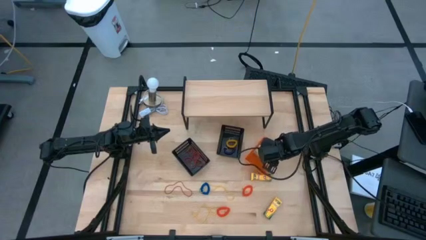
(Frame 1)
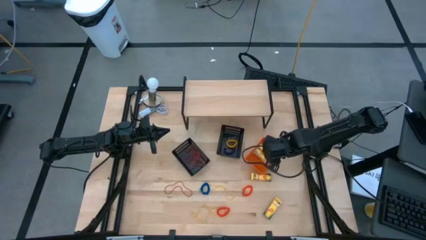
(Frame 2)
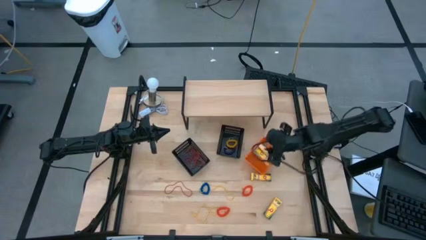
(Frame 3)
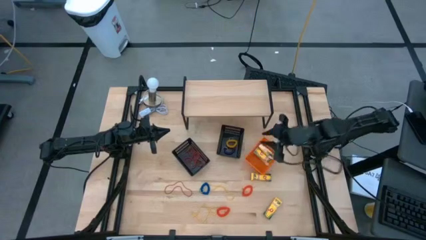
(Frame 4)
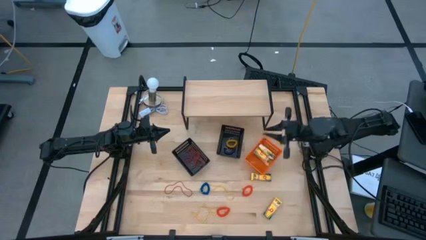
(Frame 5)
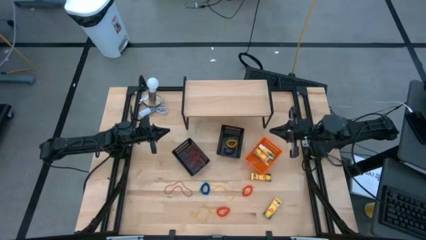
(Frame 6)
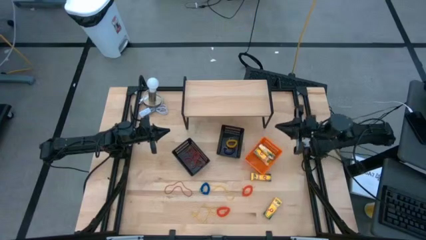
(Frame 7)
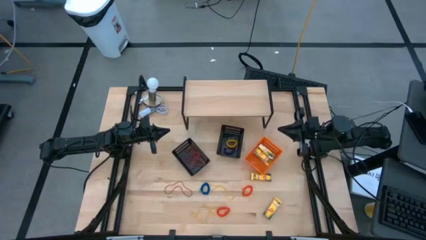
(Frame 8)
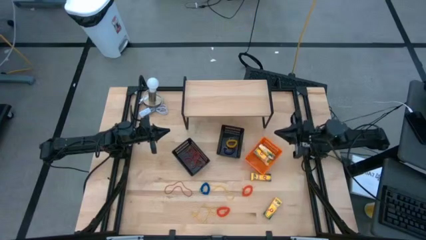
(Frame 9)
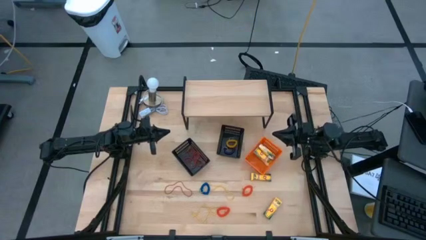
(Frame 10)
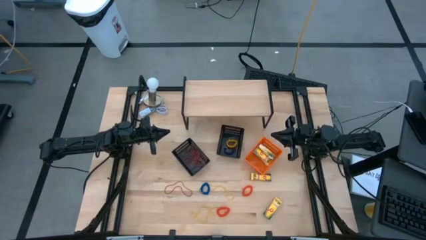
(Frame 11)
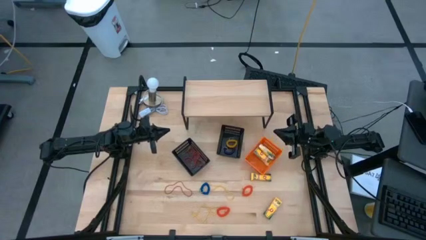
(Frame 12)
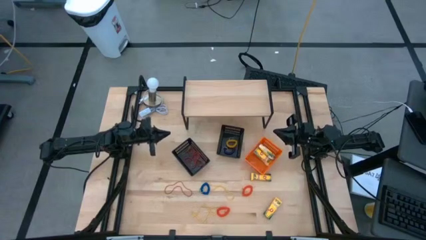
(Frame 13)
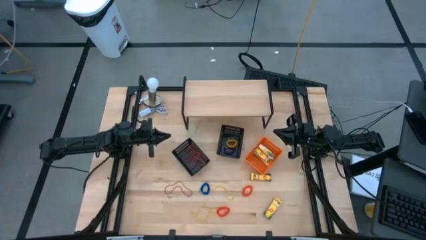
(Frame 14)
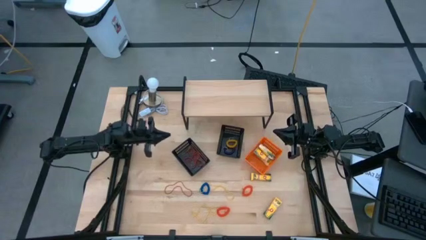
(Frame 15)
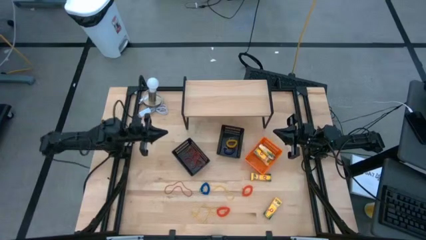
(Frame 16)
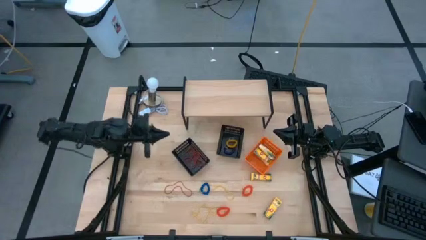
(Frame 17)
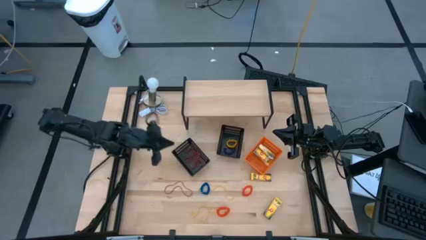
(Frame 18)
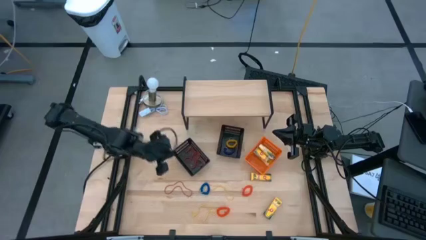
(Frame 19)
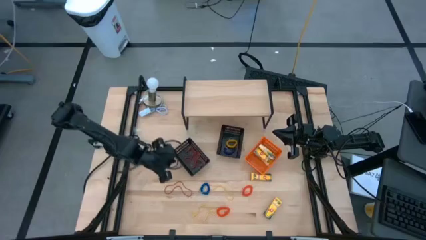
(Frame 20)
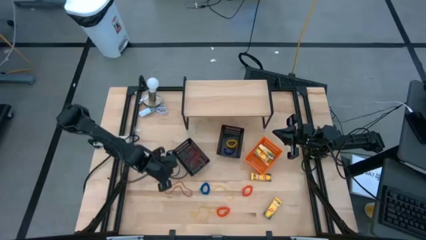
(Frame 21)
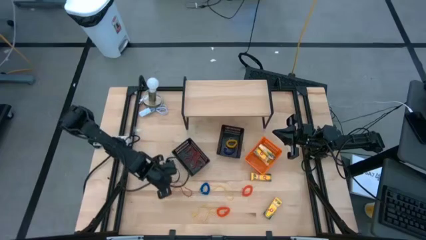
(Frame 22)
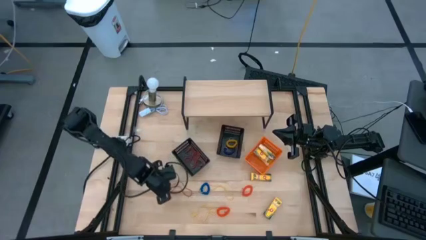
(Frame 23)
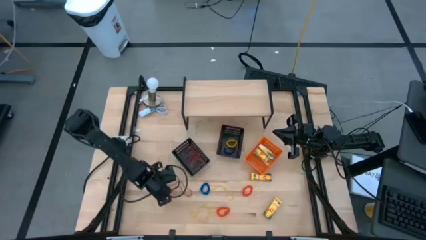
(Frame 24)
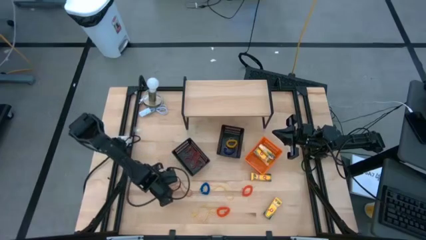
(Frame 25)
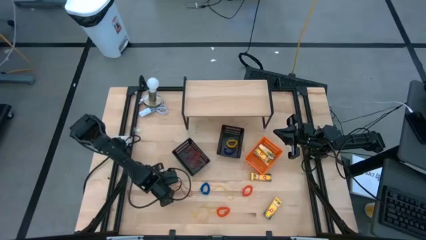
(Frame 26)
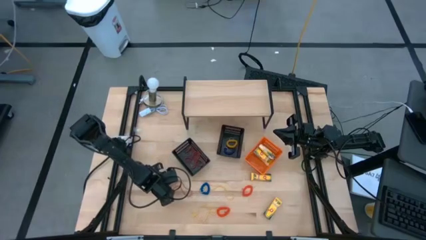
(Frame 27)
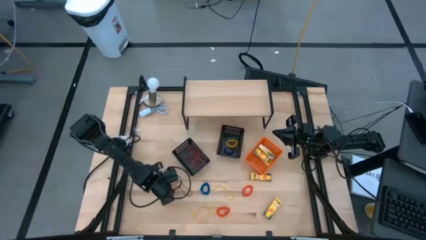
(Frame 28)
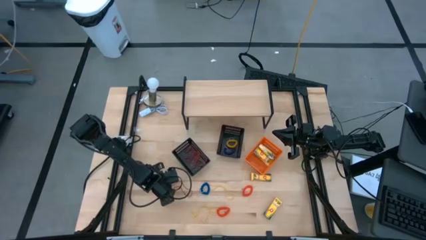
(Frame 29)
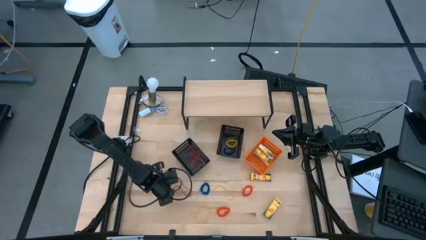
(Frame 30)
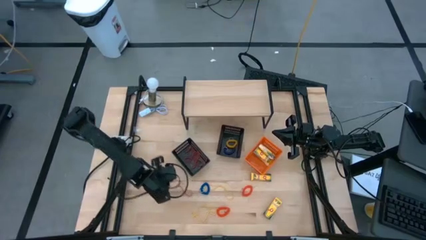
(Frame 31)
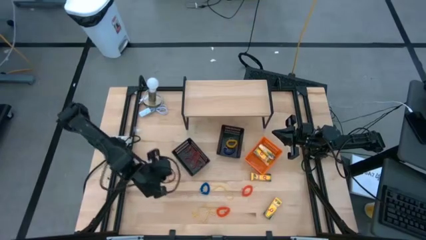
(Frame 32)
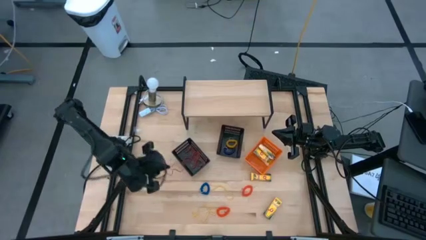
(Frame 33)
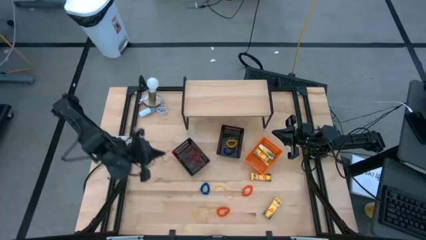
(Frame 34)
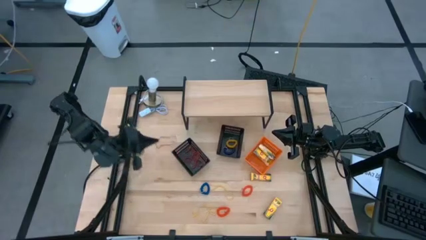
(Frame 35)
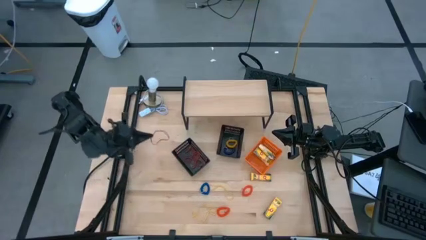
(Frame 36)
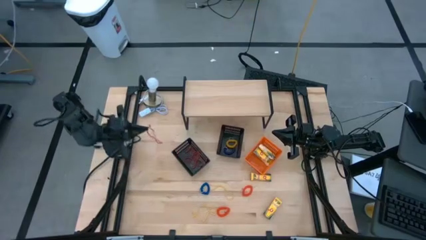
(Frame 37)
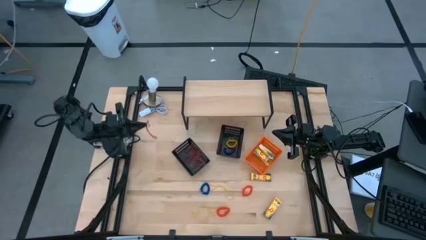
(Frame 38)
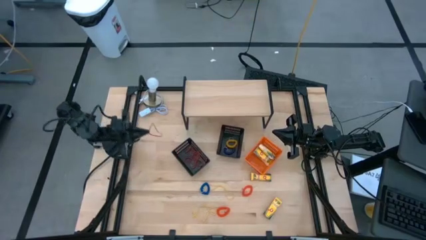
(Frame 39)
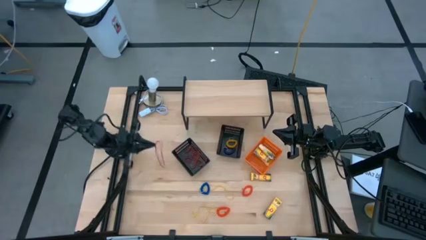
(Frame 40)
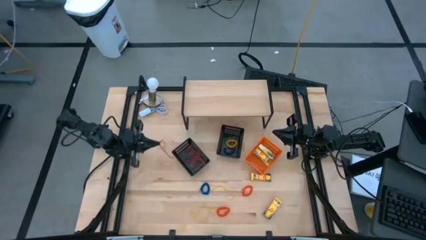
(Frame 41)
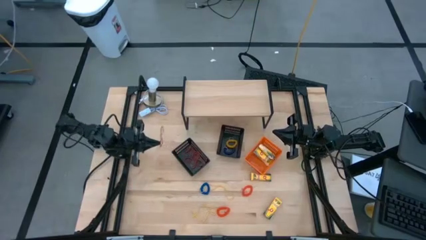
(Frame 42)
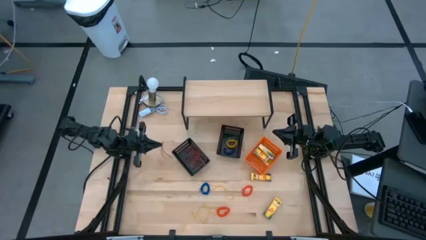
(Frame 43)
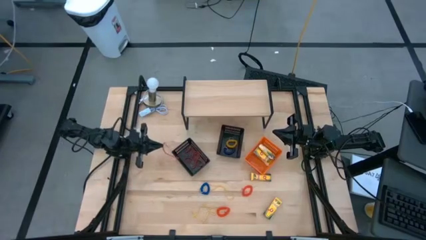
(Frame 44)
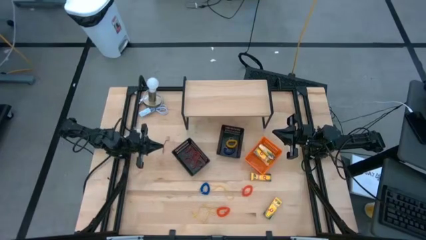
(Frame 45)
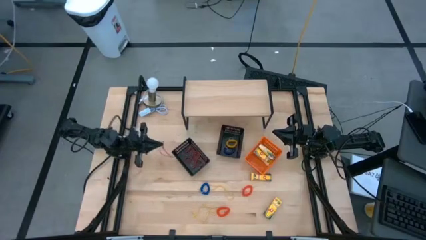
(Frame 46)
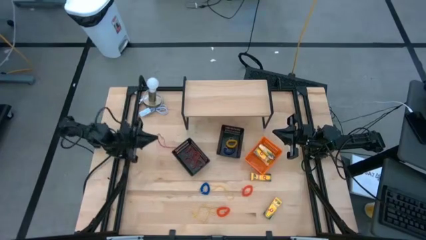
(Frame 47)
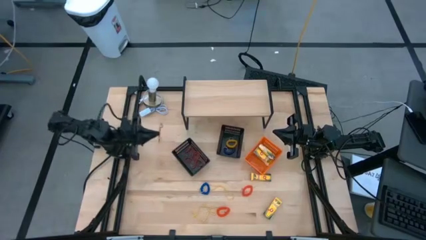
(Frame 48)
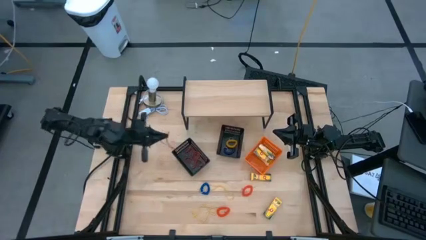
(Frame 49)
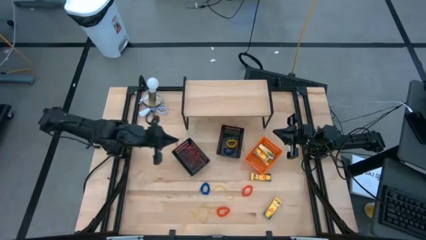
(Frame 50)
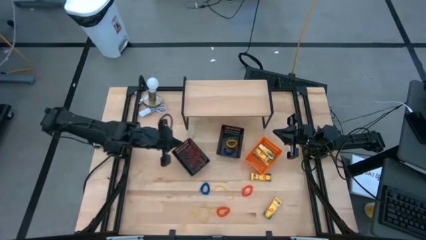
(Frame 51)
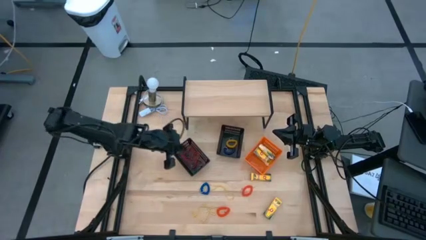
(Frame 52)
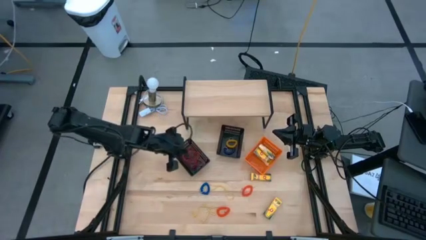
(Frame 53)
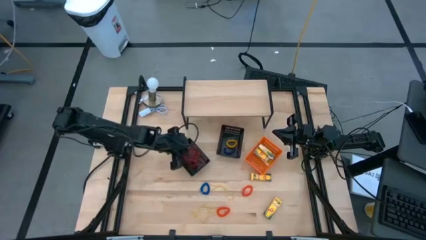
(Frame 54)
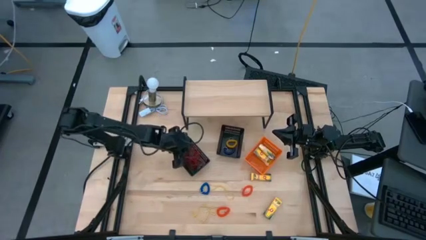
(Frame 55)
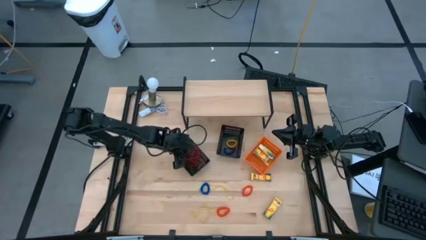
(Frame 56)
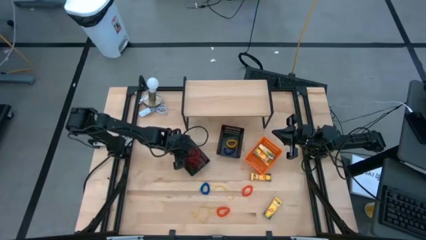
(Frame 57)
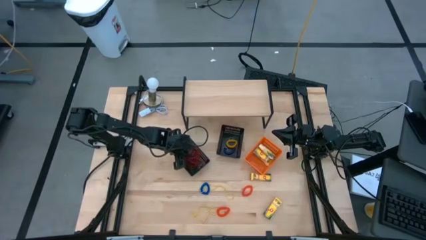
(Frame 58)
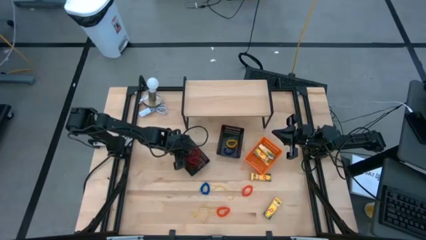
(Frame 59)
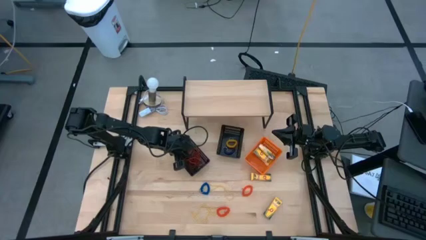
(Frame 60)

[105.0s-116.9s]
Task: Pick & Place Office Desk Supplies
Put the red rubber band into the left black bin
